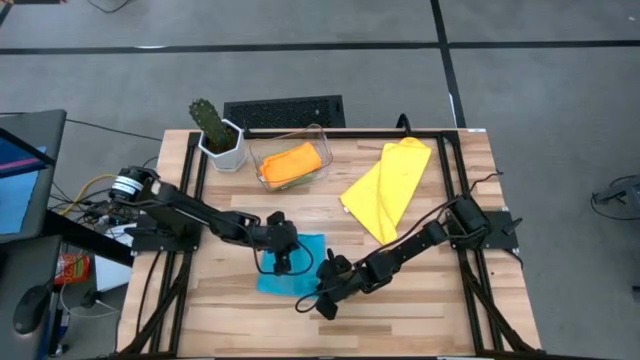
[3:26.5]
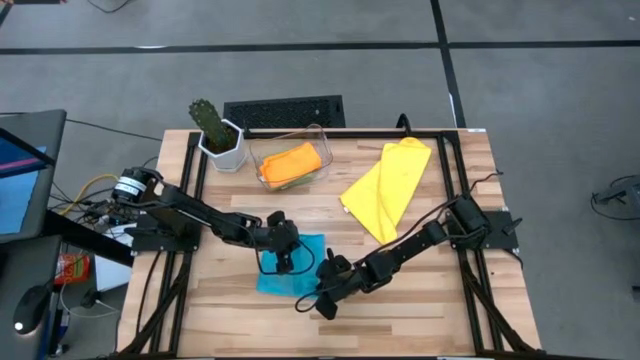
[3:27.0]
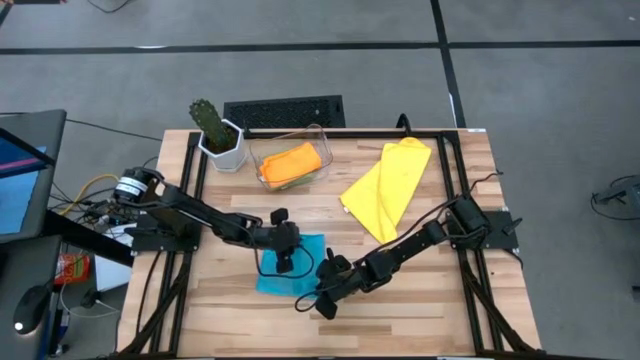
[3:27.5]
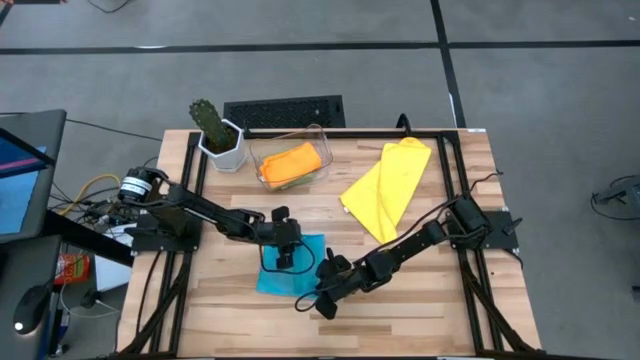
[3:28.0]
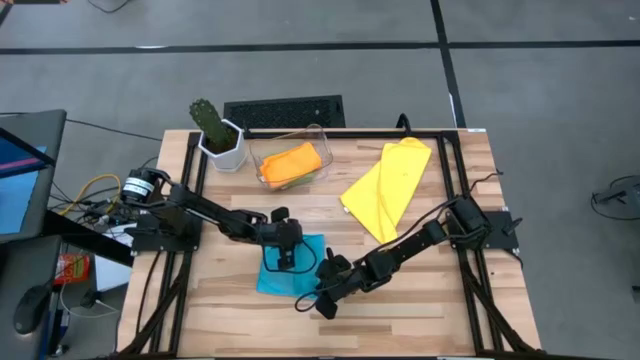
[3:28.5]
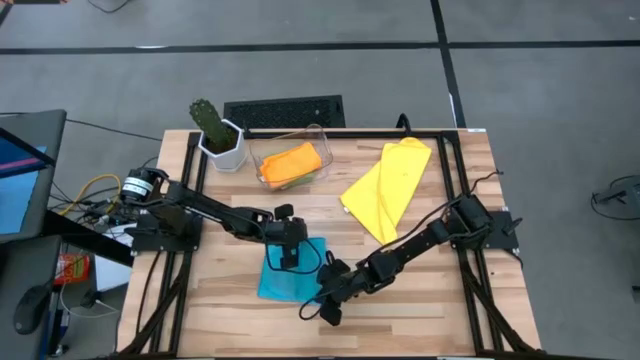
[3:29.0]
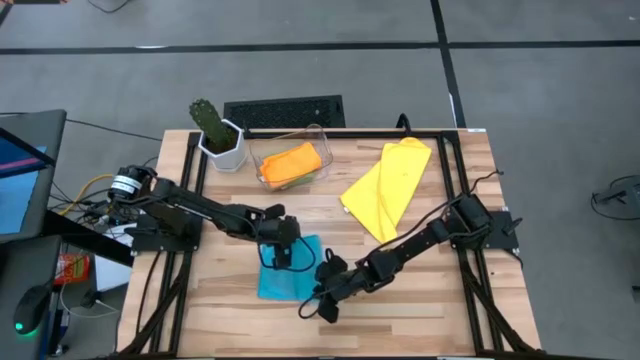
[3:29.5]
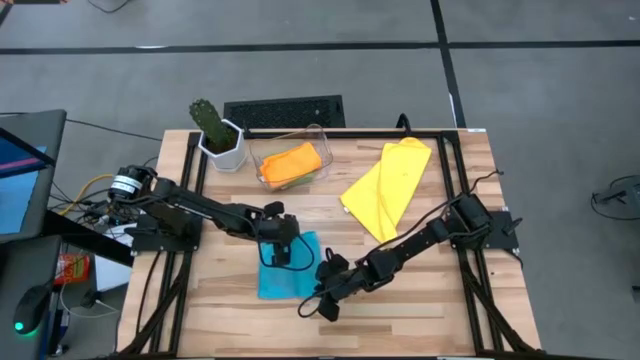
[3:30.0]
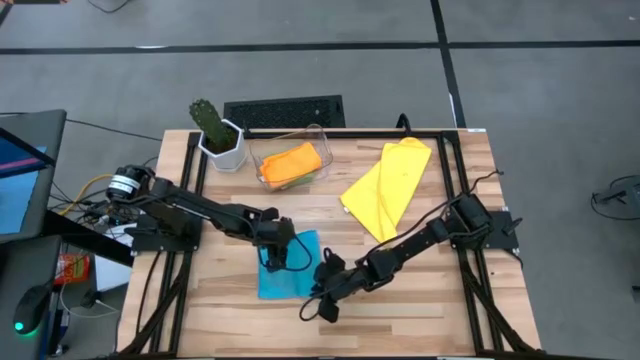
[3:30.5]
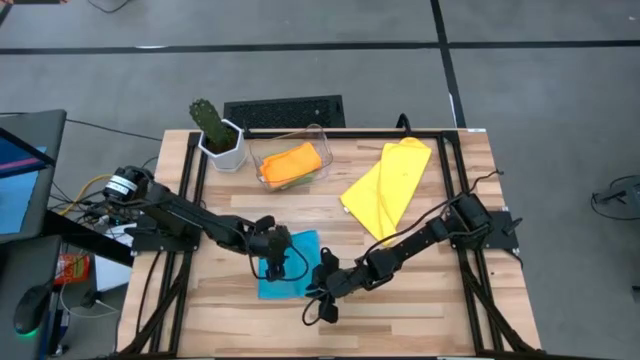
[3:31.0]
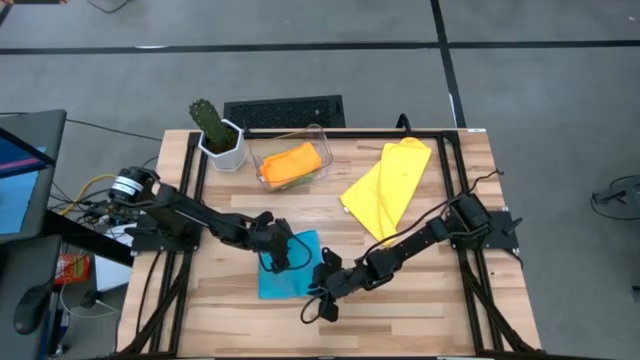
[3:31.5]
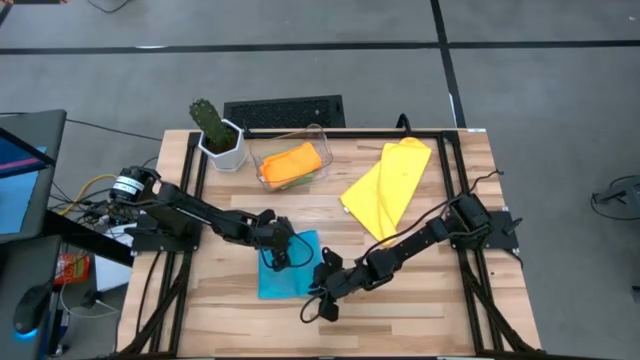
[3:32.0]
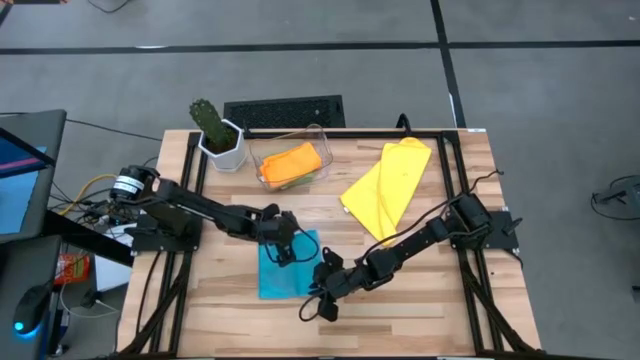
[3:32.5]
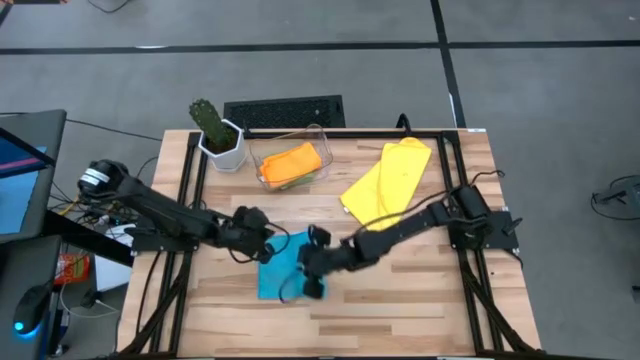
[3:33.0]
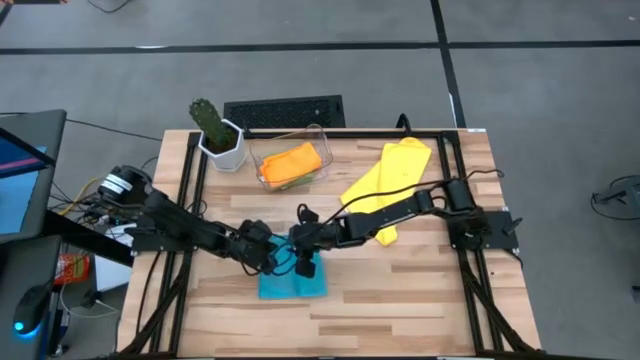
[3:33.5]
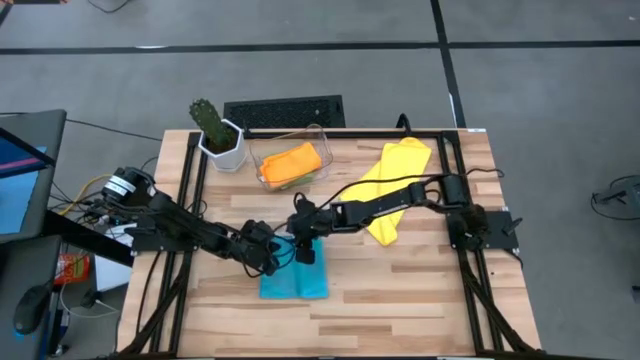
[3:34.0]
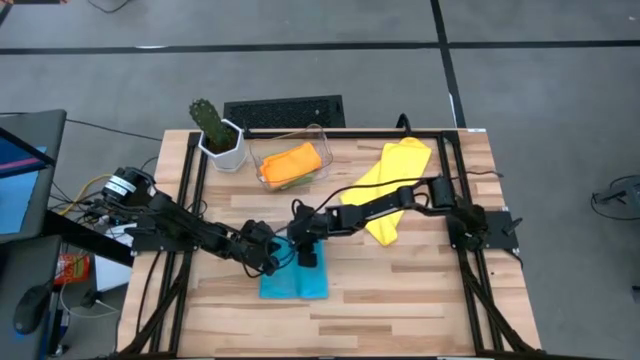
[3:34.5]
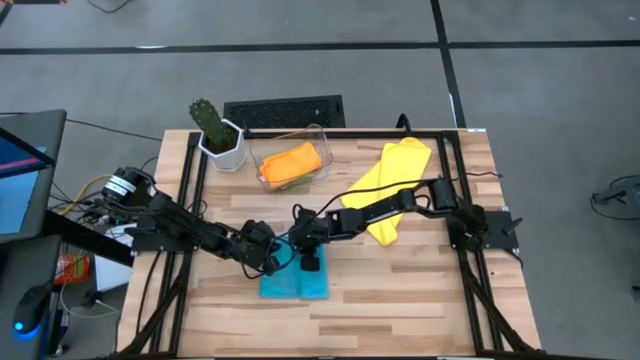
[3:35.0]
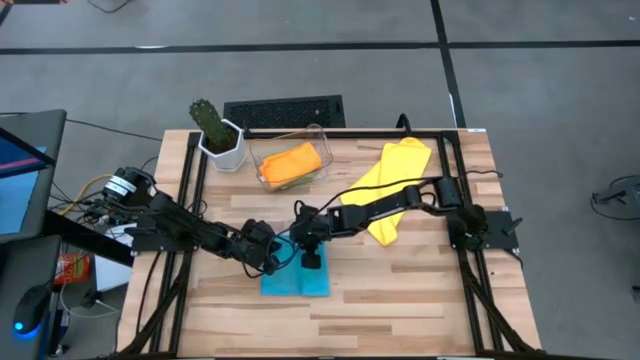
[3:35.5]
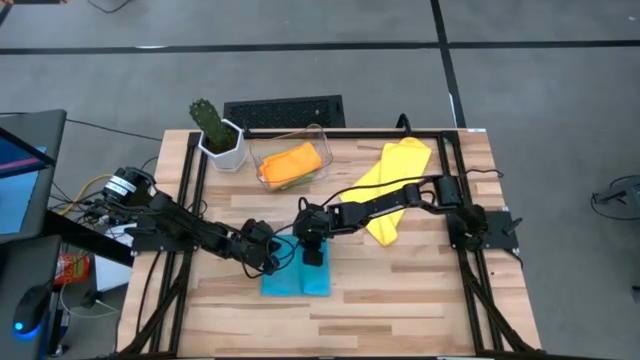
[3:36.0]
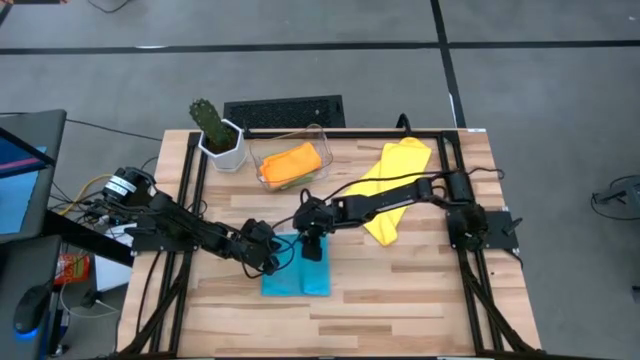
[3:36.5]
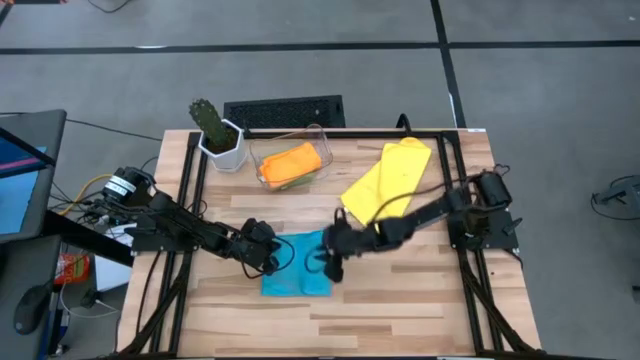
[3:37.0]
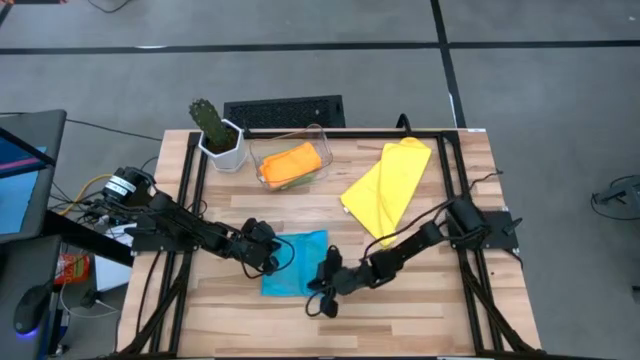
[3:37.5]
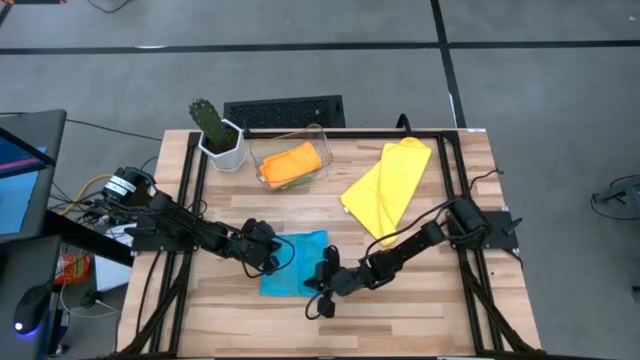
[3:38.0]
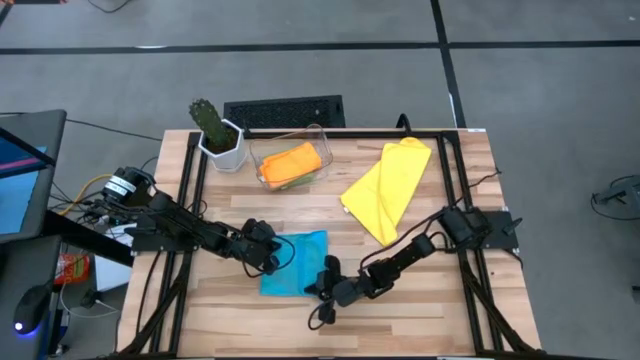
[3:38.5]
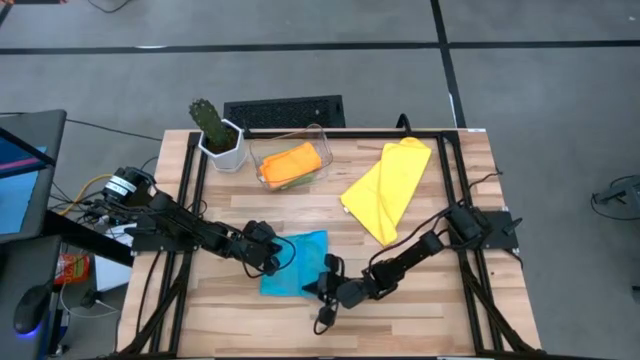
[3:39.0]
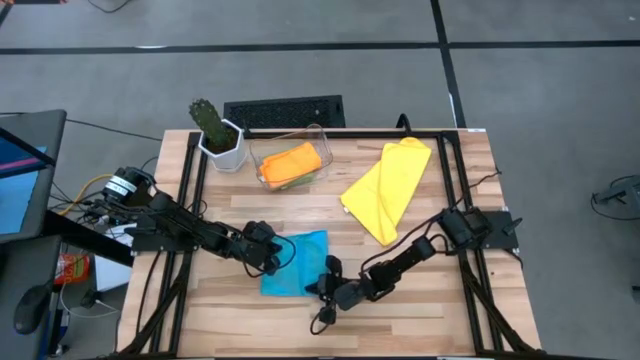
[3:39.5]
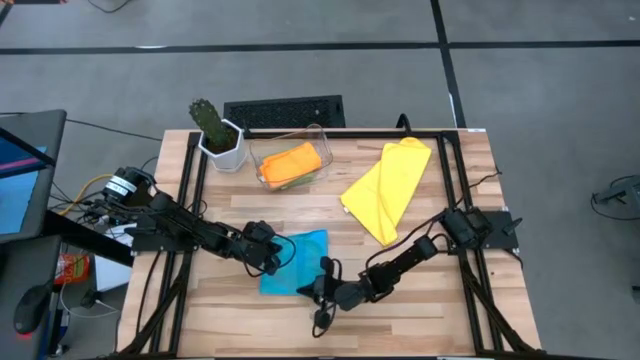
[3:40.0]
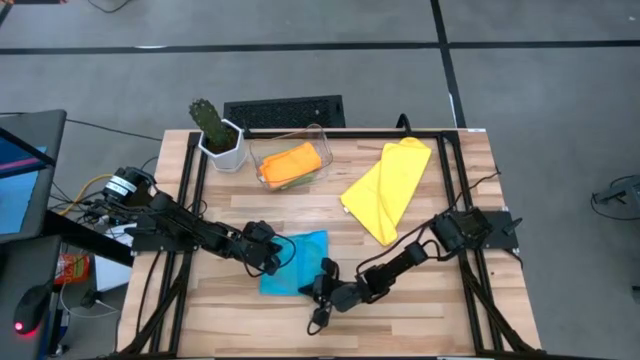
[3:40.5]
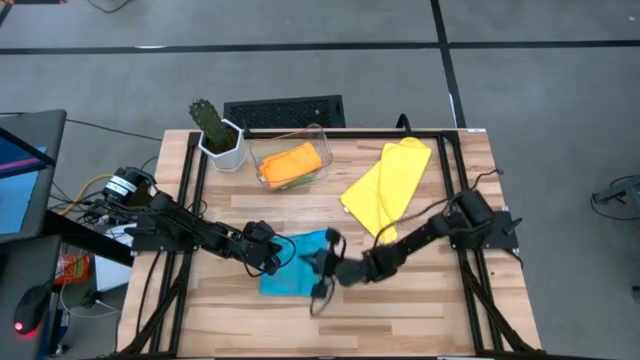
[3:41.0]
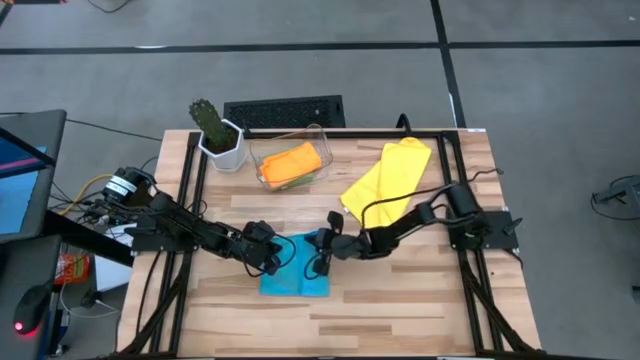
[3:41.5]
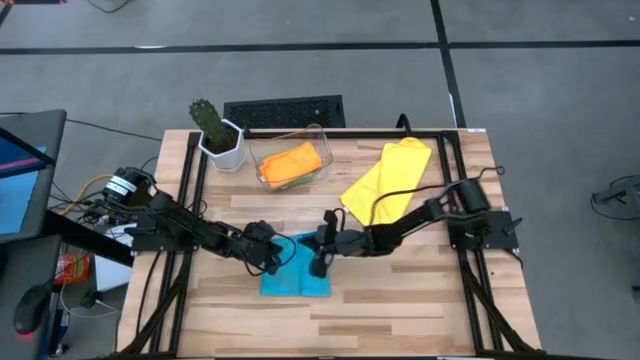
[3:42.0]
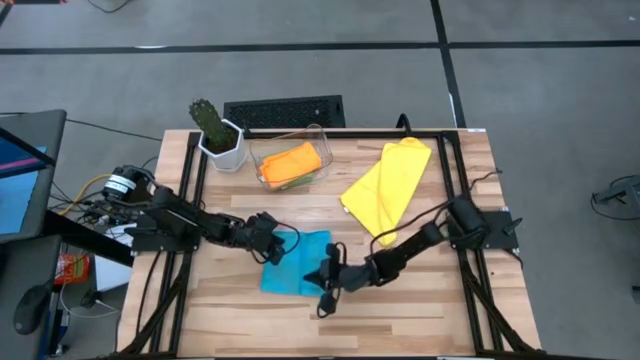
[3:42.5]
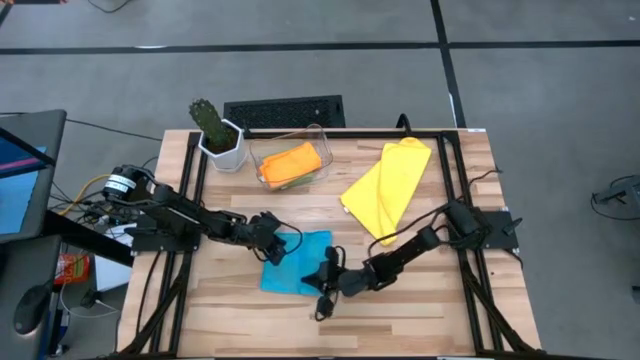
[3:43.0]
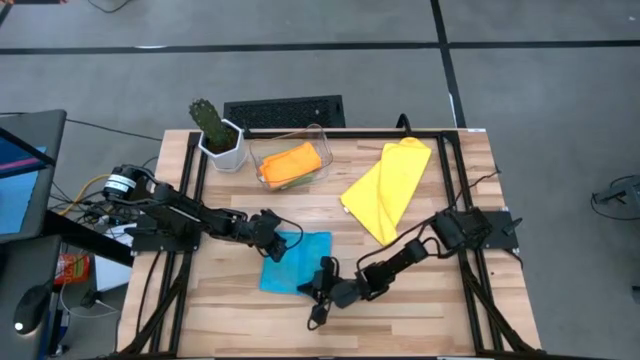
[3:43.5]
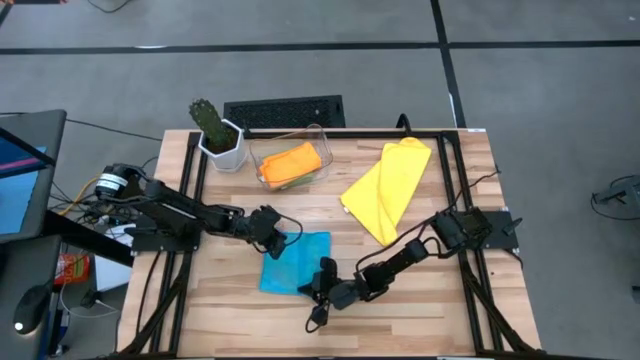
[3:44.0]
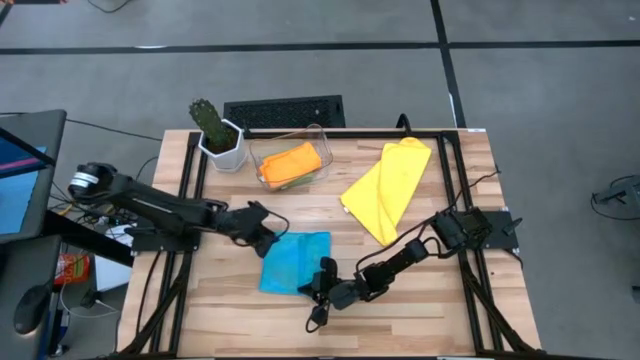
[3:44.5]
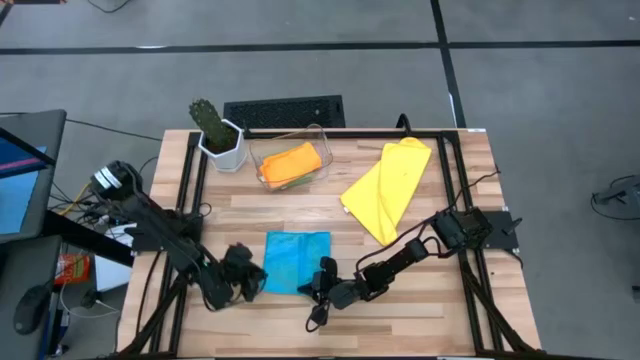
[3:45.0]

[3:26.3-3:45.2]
Task: Fold microfiber towels
Fold the blue microfiber cloth
